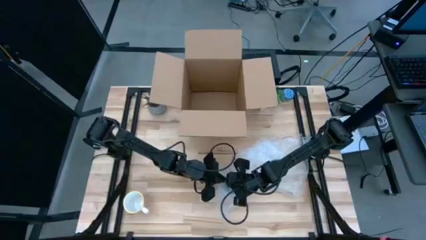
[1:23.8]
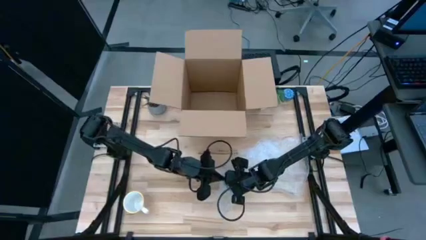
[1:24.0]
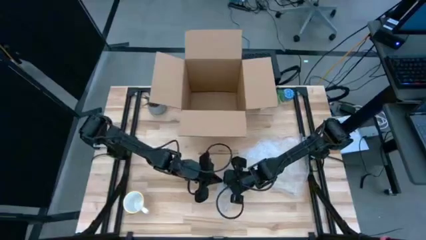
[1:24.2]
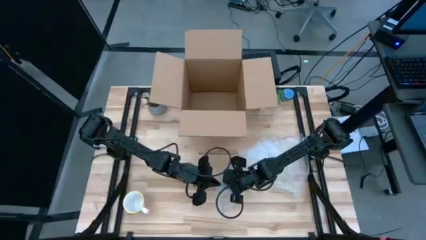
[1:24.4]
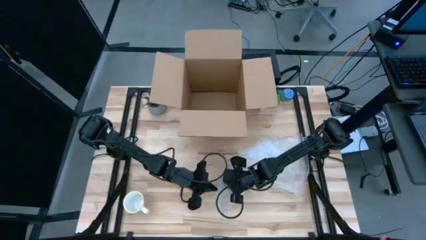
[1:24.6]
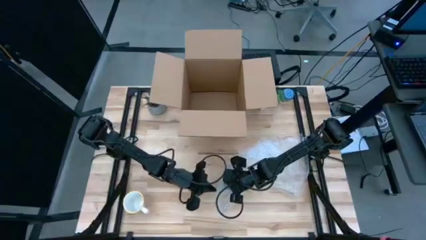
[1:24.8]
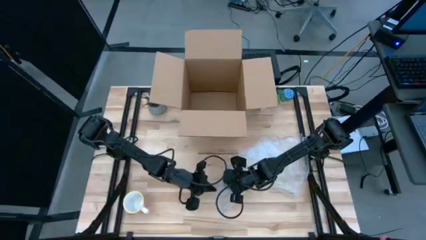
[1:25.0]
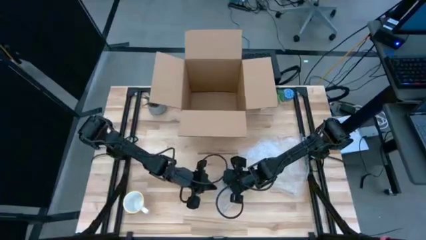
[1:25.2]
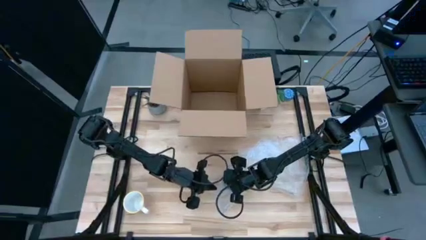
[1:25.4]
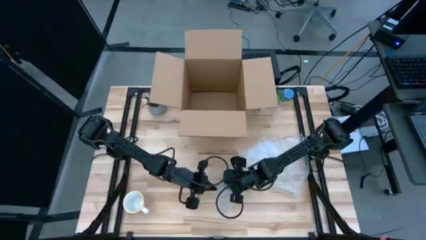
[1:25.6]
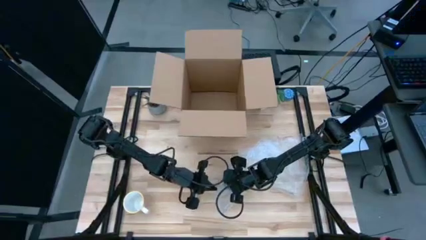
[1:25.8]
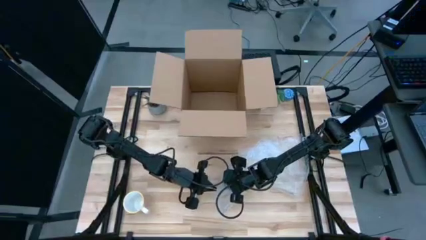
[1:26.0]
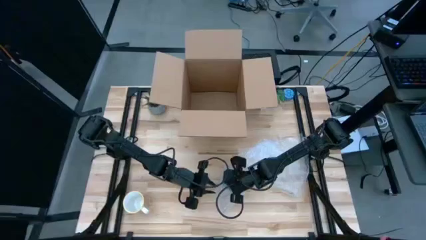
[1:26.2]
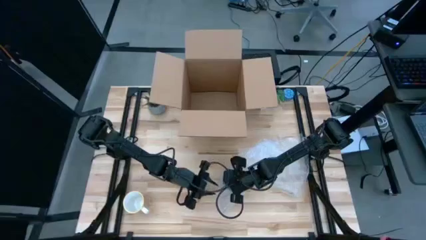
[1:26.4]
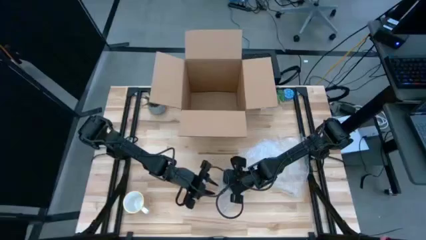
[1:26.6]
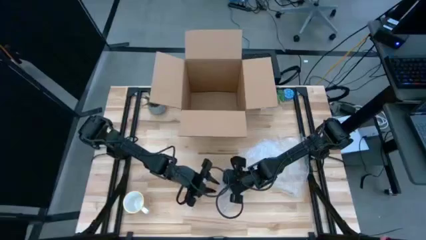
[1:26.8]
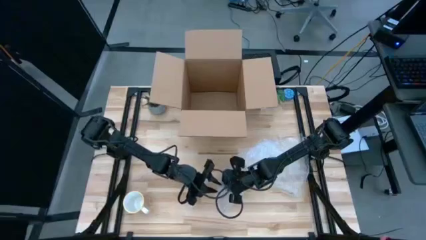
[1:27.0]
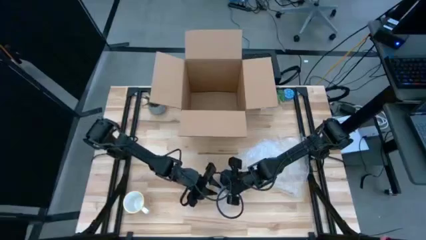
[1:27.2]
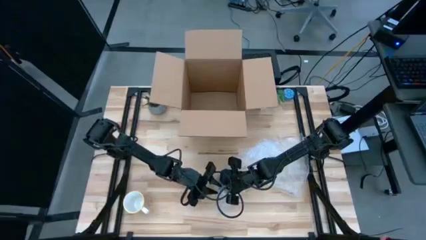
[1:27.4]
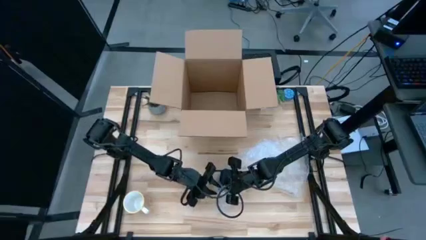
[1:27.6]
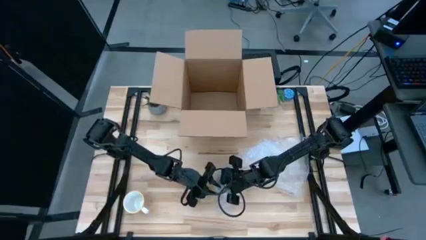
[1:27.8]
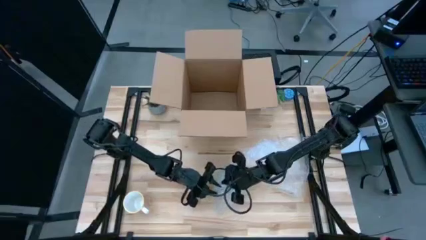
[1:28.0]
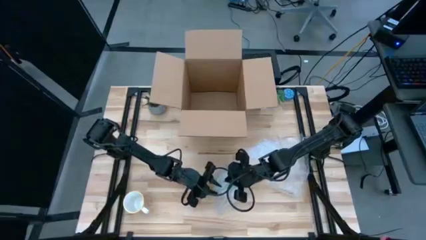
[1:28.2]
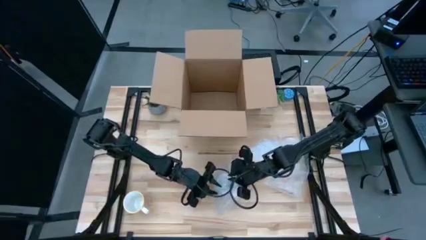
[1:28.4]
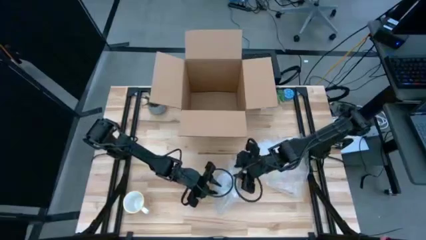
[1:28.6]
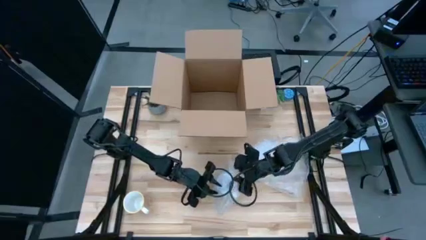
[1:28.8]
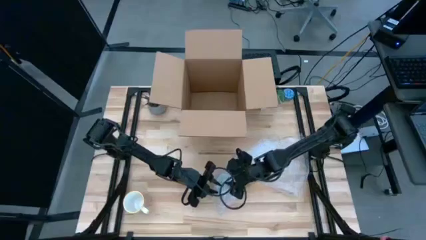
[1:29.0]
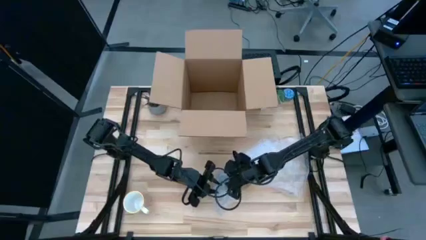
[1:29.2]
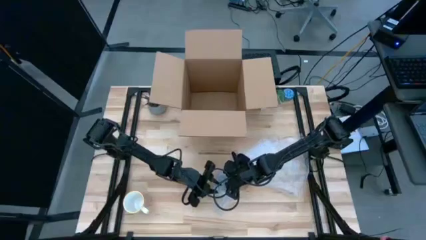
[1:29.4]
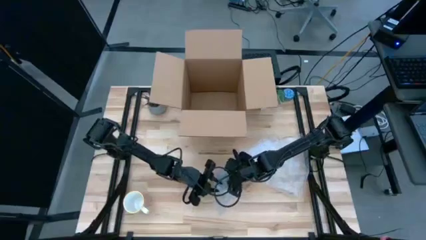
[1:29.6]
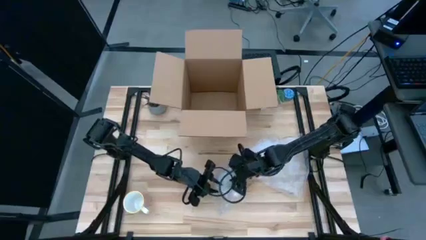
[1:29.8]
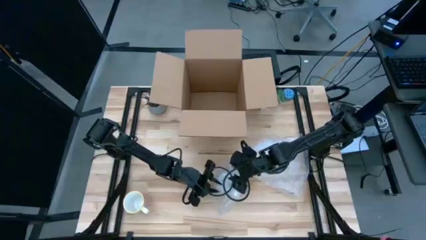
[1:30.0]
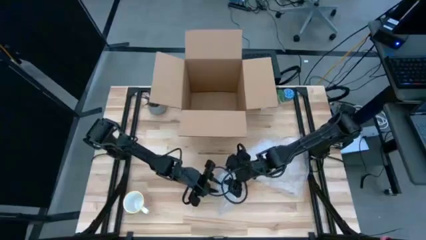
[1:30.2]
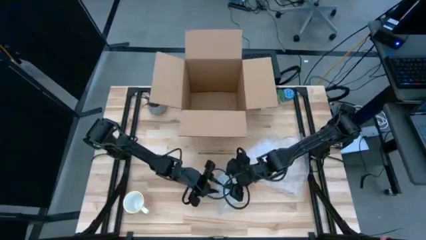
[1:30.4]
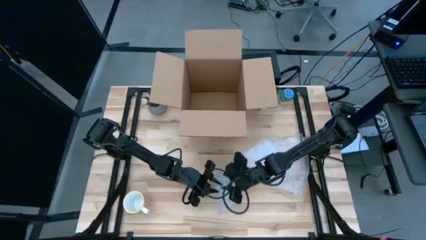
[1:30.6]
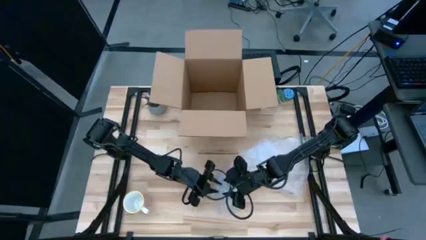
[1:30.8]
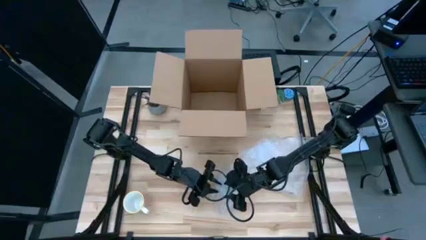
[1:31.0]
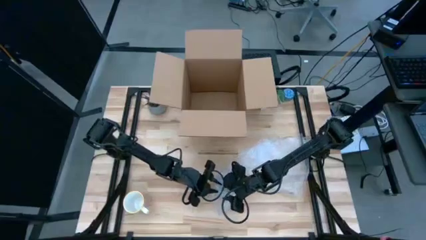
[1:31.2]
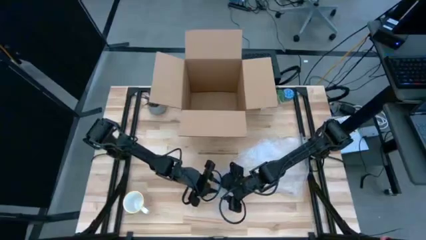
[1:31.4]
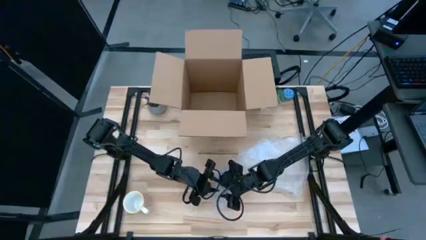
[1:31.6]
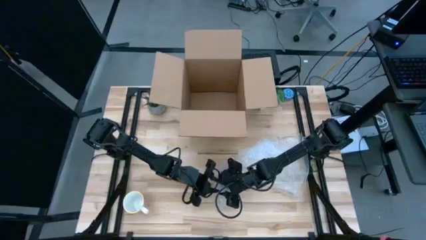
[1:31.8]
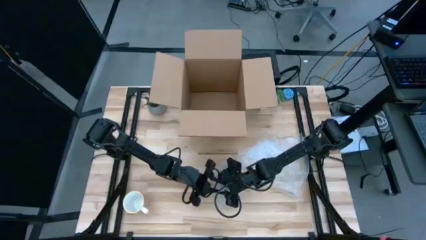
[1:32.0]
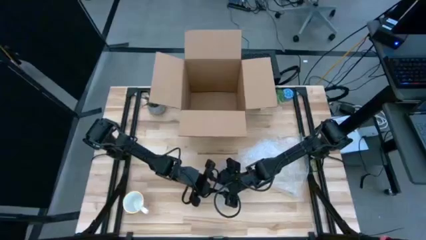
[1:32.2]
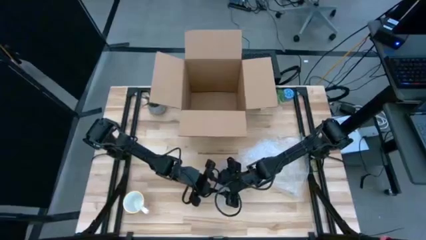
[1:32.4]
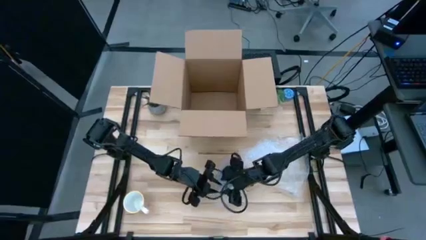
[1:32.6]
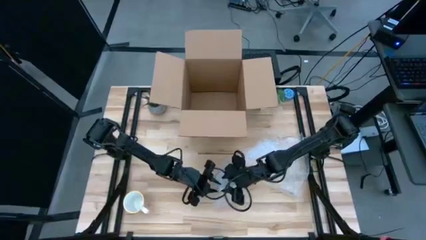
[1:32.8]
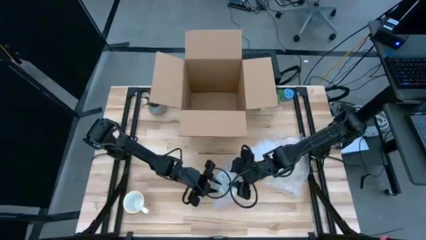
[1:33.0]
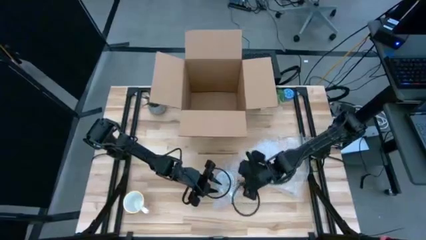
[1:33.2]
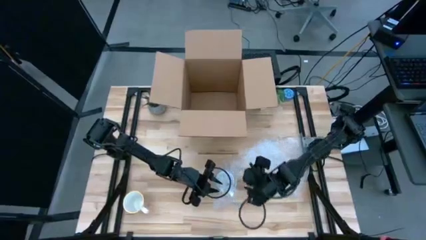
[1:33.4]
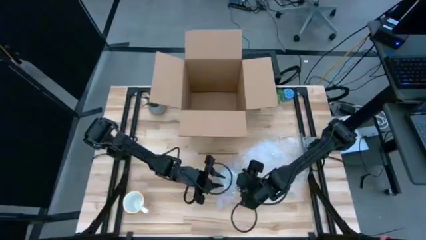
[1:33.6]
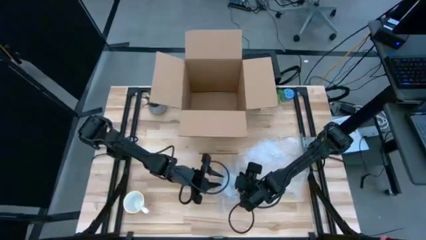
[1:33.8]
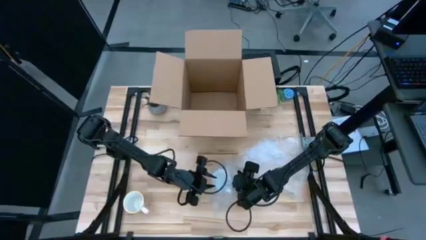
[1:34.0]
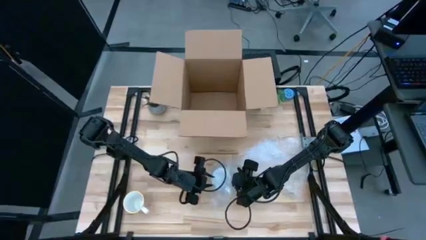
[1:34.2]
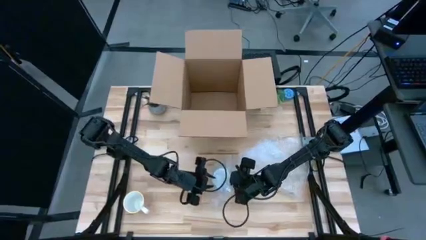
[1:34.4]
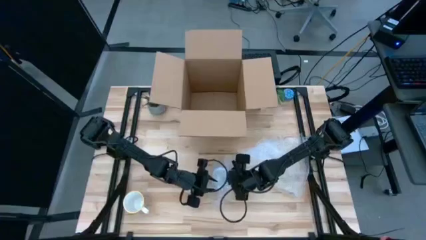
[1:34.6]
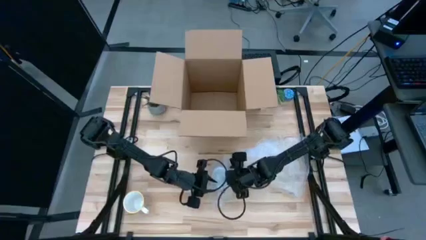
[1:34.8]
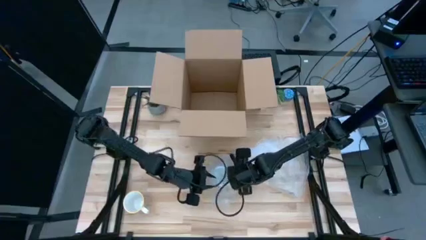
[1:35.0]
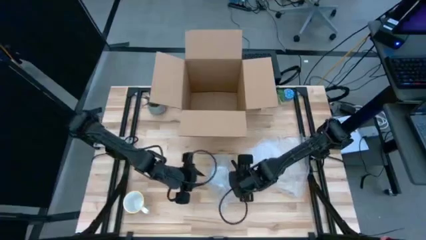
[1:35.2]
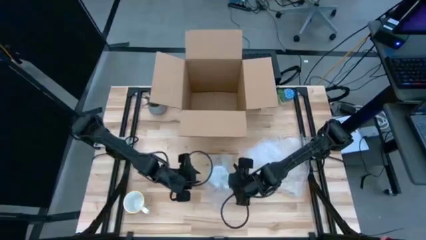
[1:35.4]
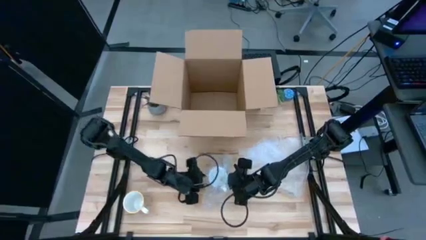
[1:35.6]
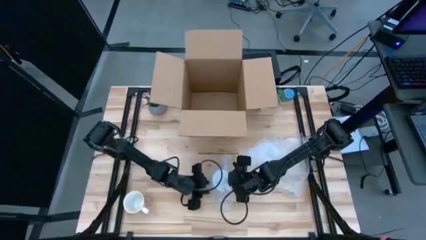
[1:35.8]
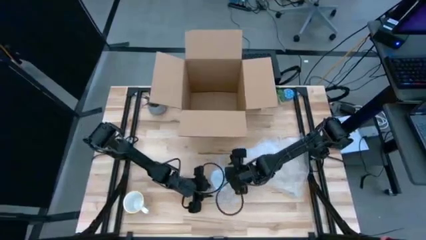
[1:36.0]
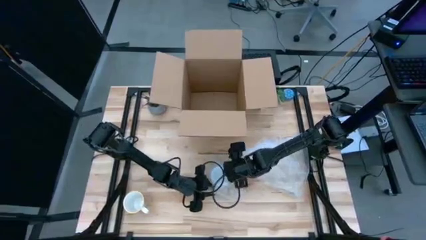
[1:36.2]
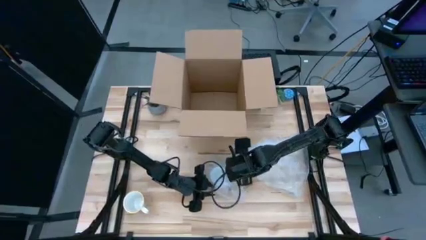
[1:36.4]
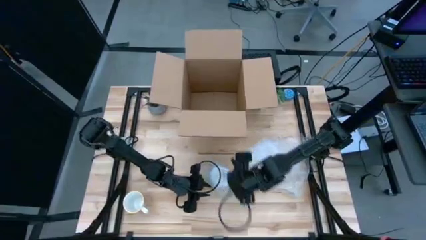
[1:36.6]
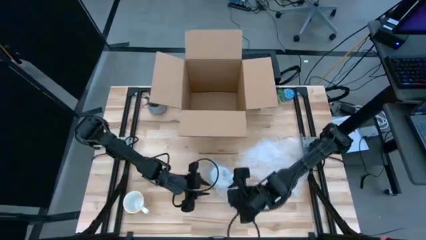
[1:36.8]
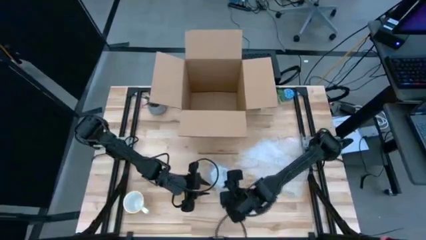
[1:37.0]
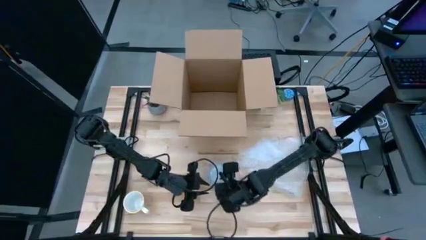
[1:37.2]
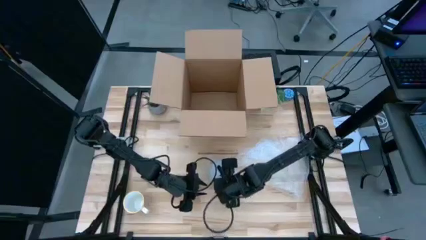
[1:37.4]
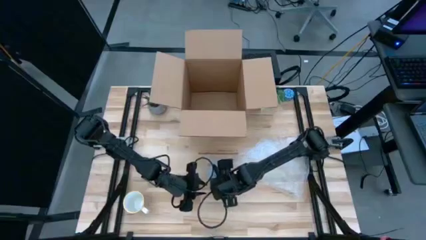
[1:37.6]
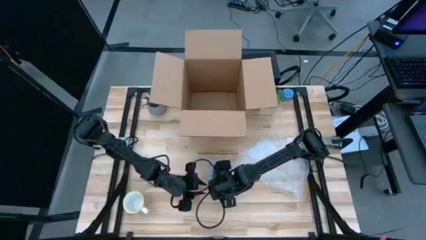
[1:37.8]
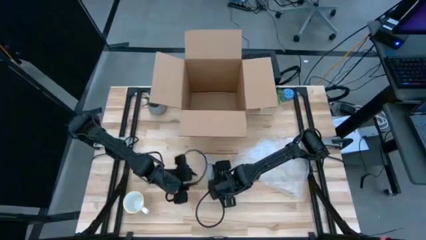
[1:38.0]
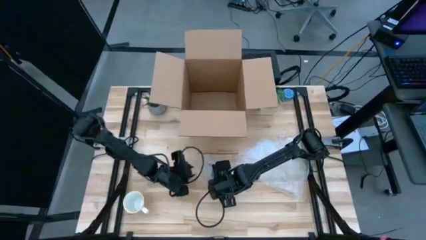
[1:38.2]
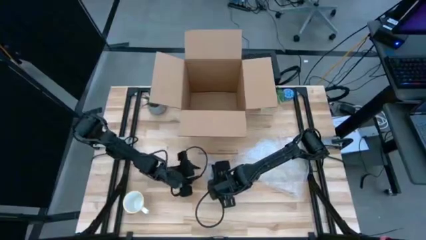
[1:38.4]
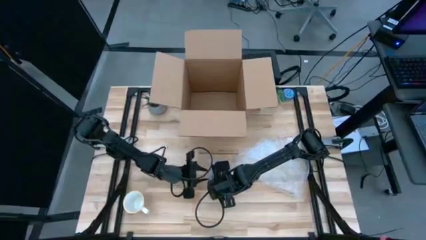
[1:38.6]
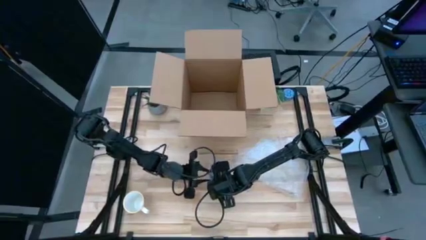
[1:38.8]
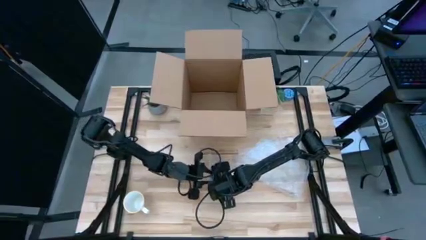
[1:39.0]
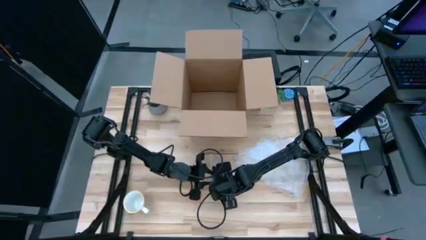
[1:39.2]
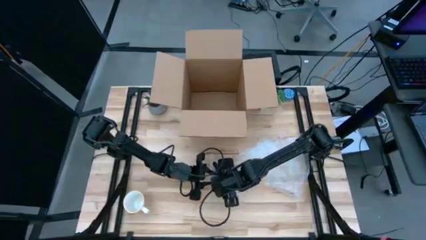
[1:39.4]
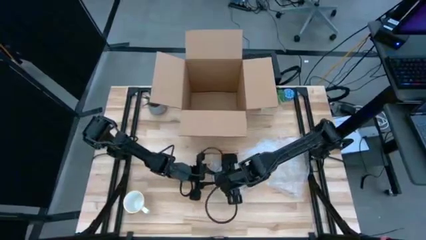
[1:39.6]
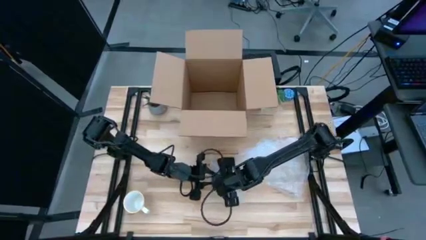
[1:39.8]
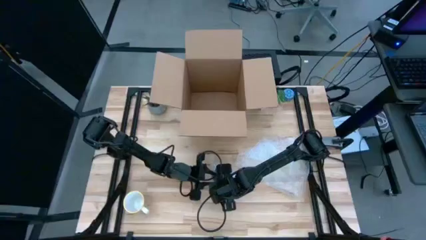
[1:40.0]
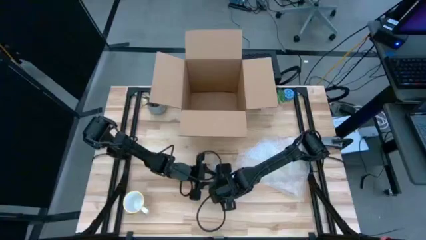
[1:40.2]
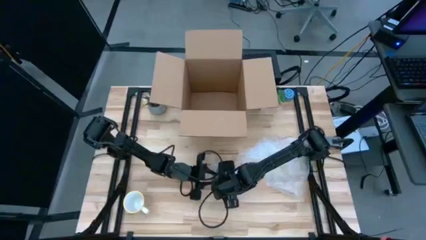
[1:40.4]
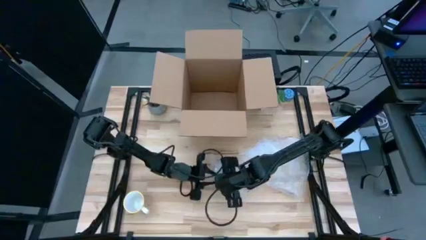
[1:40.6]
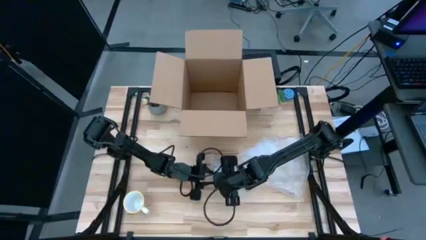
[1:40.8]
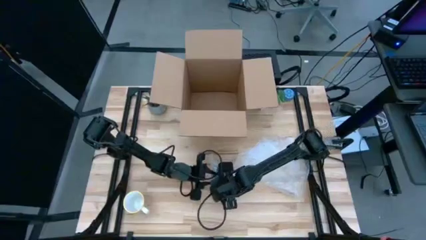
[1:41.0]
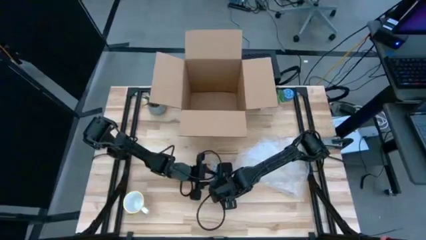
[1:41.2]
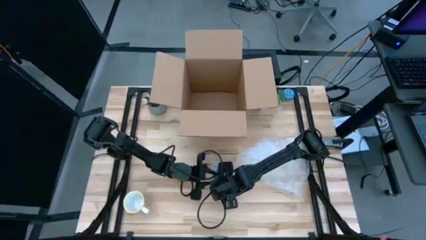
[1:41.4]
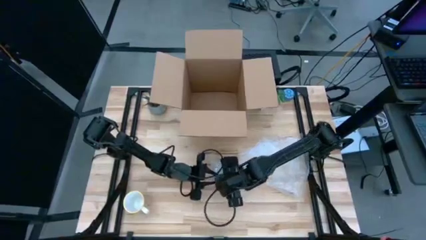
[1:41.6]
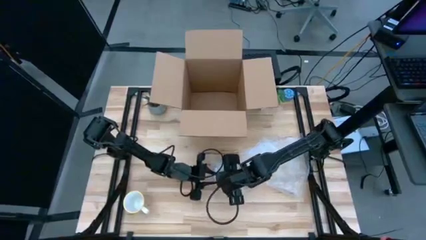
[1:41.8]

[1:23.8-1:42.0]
Task: wrap mug
Wrap the red mug with bubble wrap
